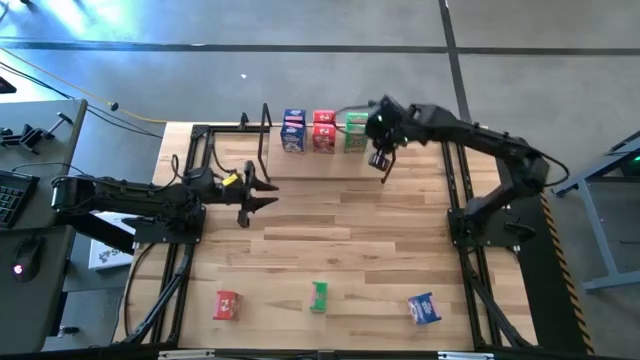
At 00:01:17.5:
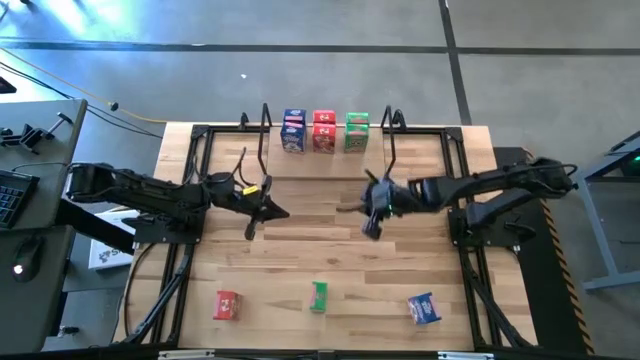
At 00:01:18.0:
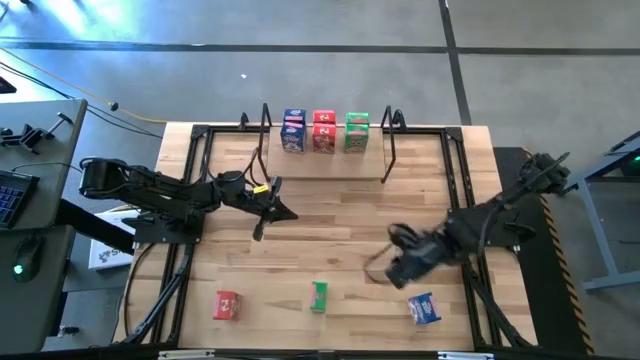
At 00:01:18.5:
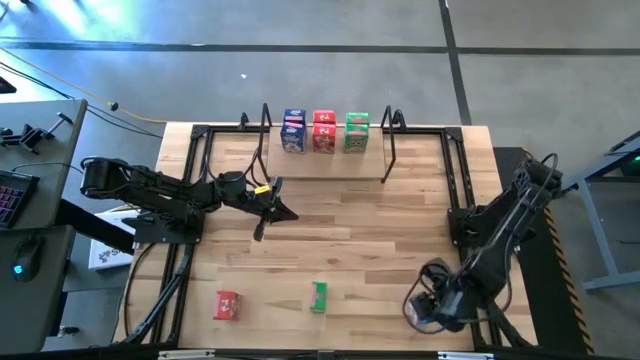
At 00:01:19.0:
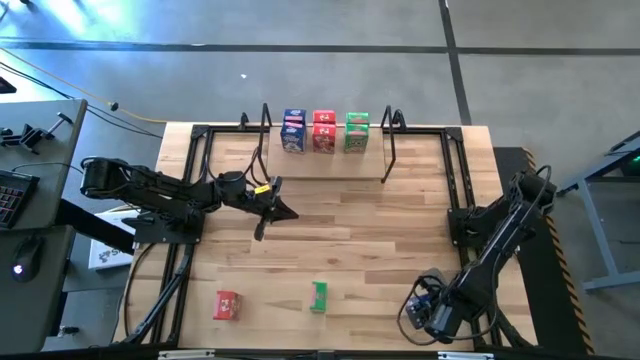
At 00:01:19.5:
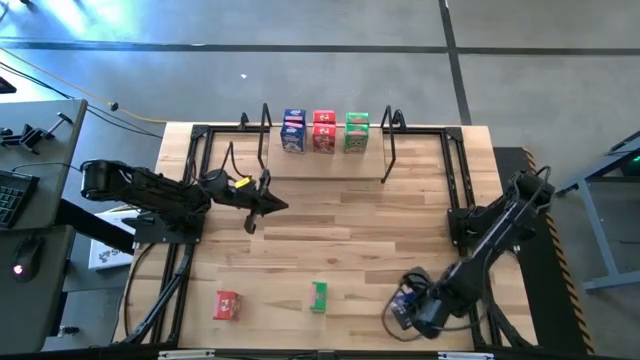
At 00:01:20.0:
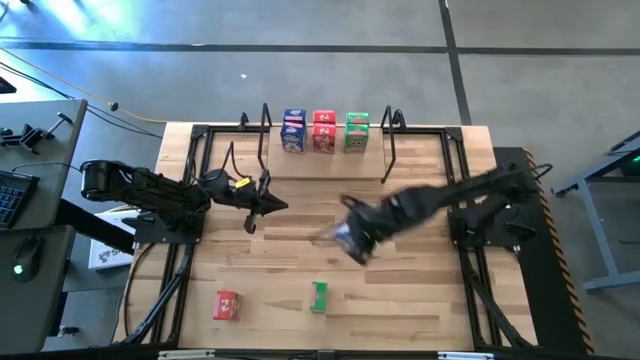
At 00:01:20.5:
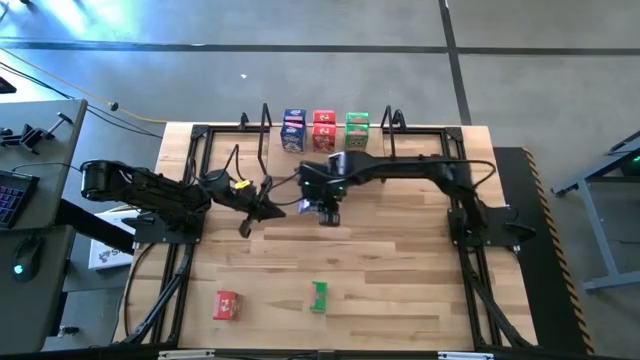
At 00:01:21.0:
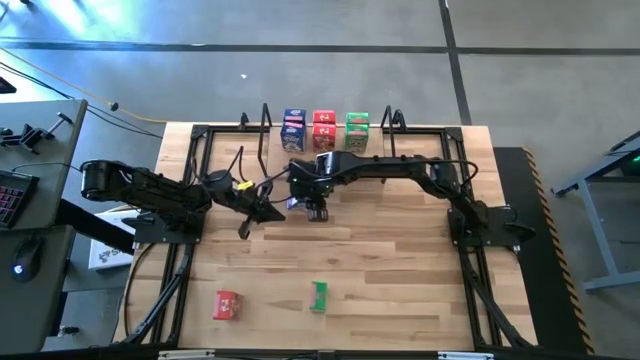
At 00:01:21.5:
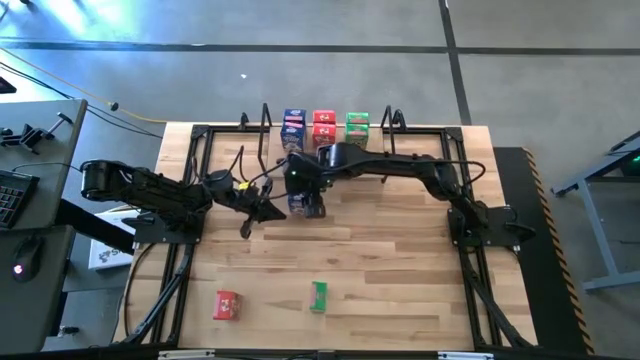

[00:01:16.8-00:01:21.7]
Task: Stack cereal on shelf
Move the blue cereal box to the center of the table

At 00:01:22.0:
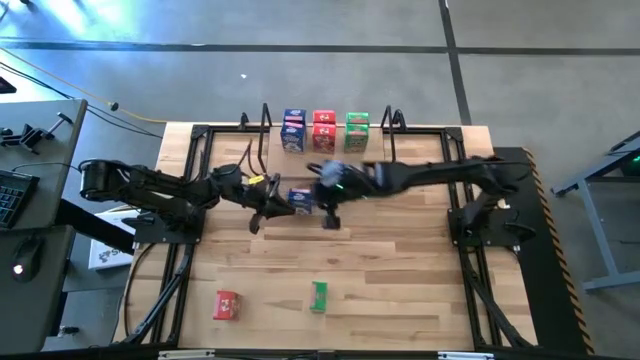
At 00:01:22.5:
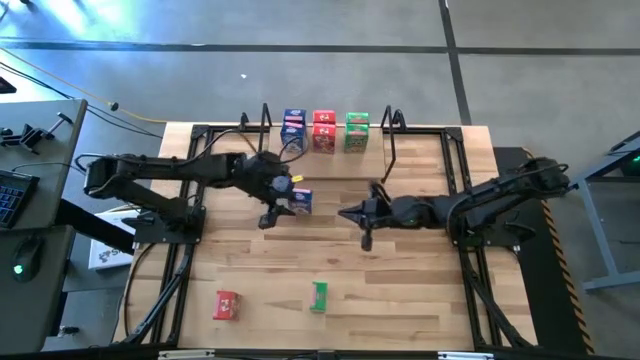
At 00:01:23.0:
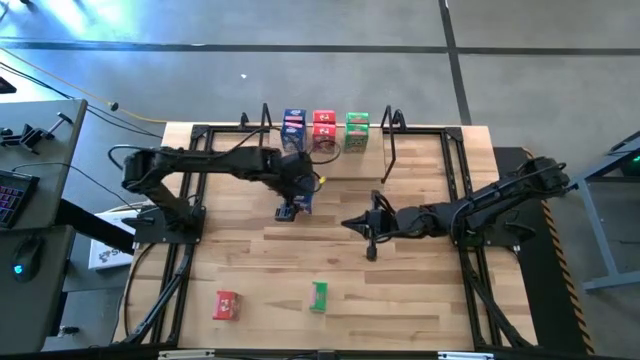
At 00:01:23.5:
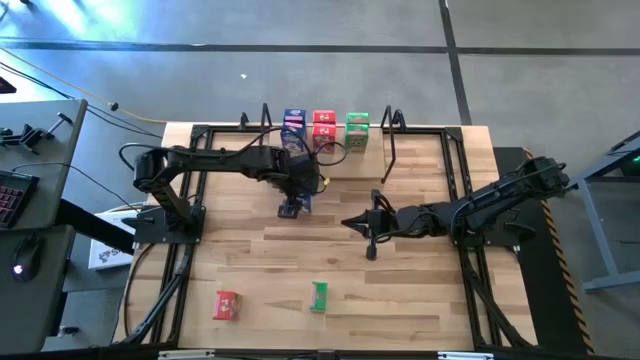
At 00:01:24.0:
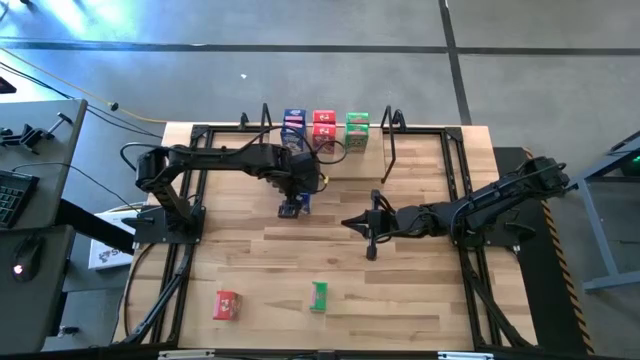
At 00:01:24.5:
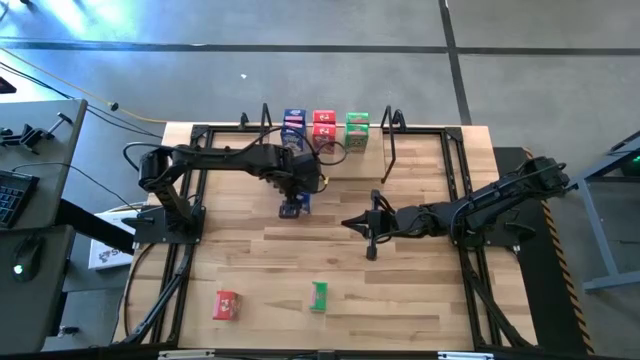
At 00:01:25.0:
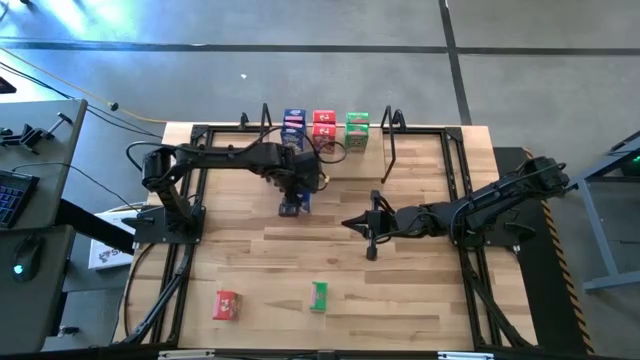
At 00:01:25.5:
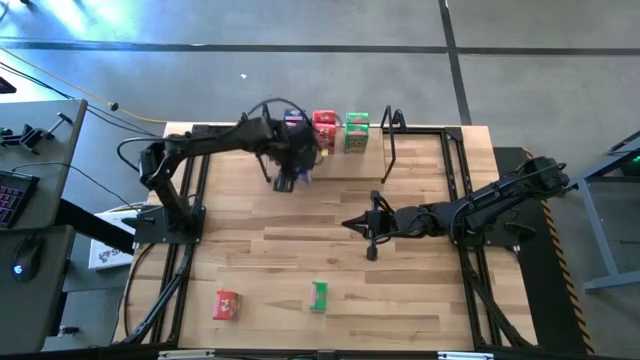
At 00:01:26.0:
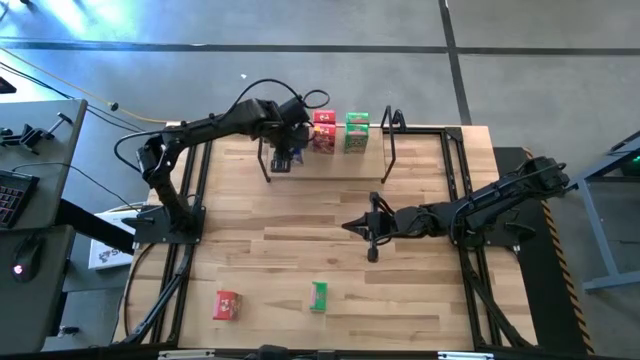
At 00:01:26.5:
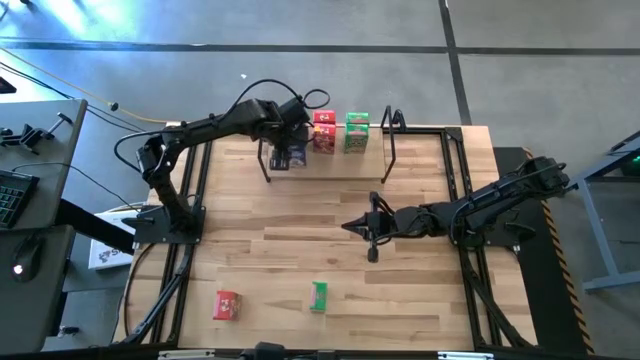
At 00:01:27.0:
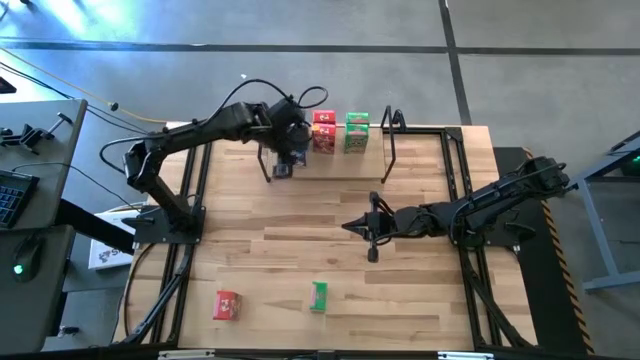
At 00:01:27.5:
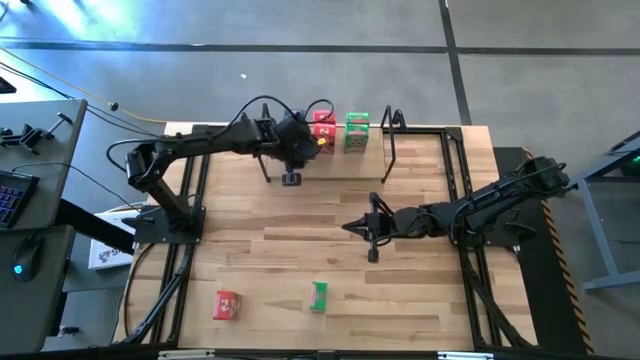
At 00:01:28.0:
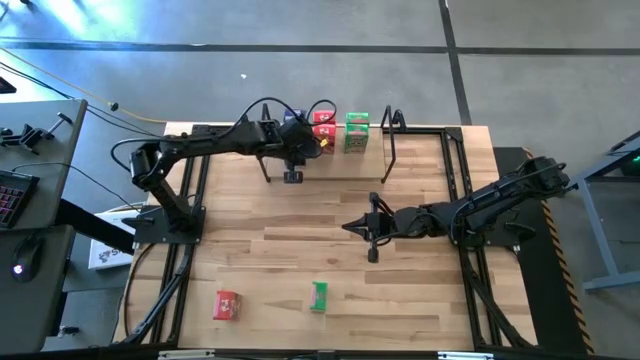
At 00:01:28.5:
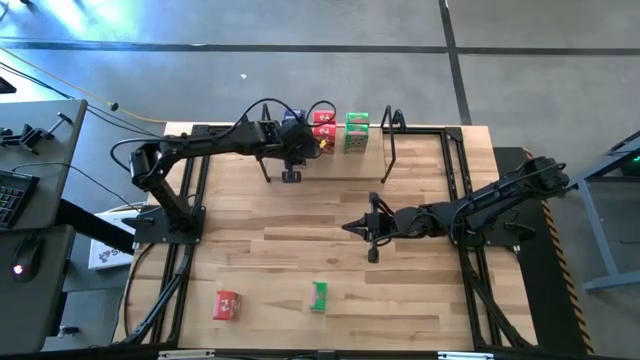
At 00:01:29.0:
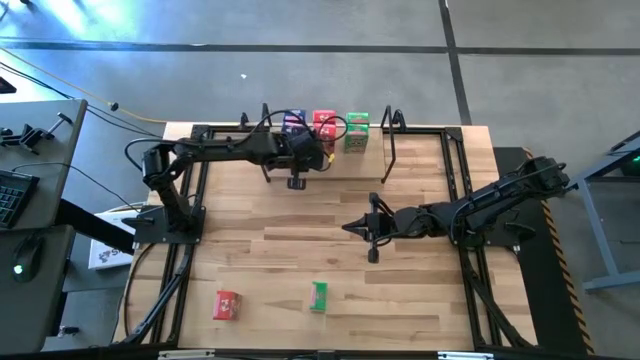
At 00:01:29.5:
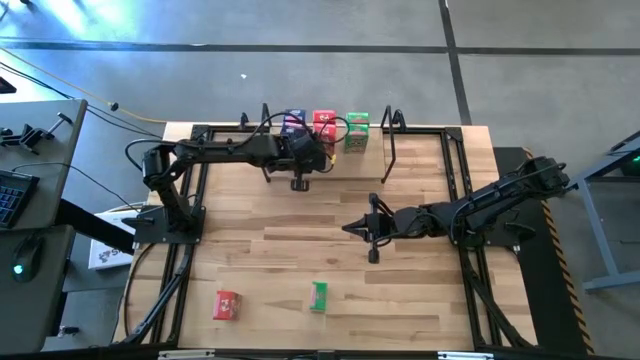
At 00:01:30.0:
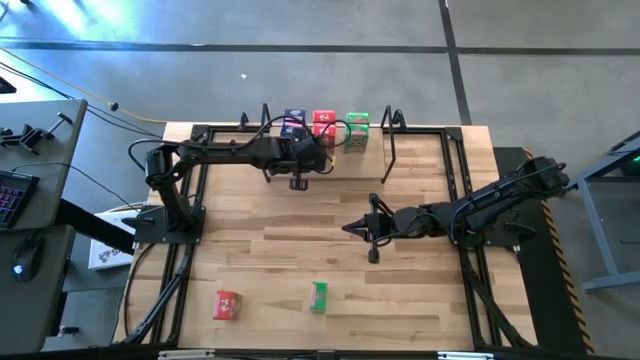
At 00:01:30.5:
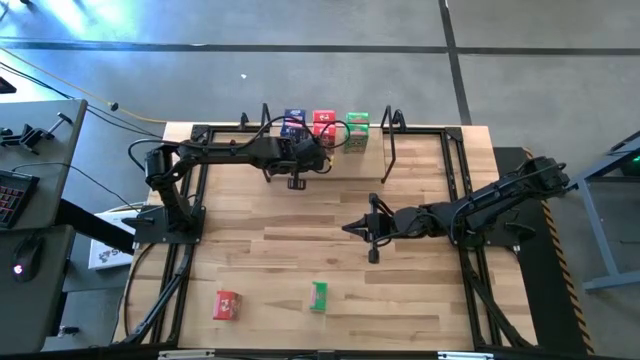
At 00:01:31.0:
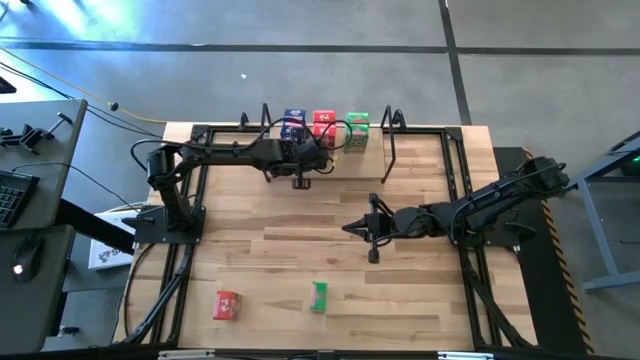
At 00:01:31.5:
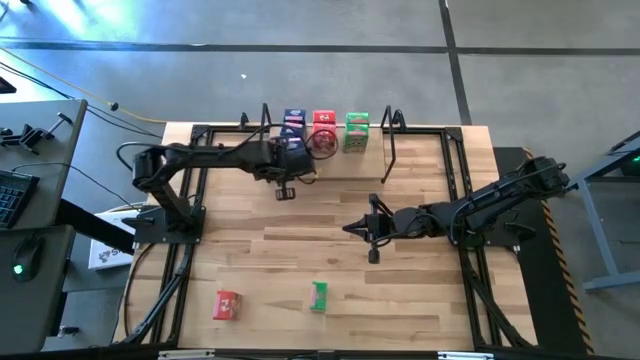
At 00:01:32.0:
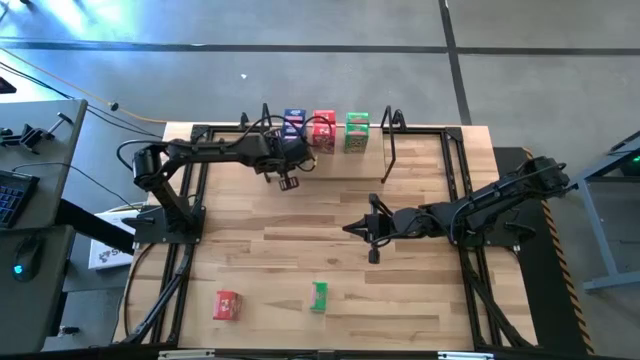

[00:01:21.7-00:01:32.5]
Put the center blue cereal box on the shelf aligned with the other blue cereal box

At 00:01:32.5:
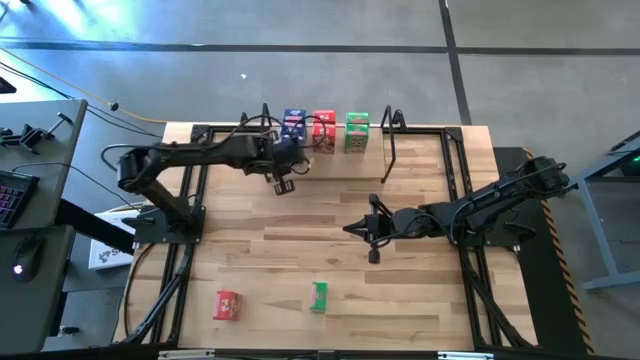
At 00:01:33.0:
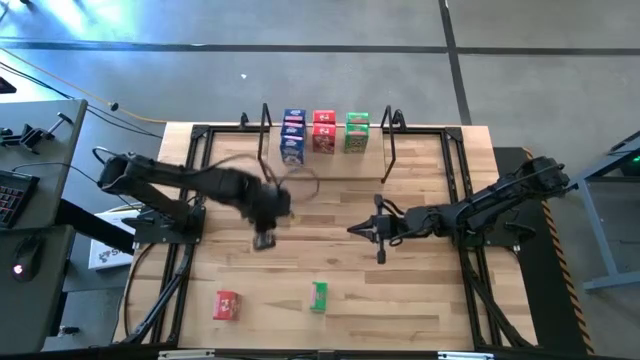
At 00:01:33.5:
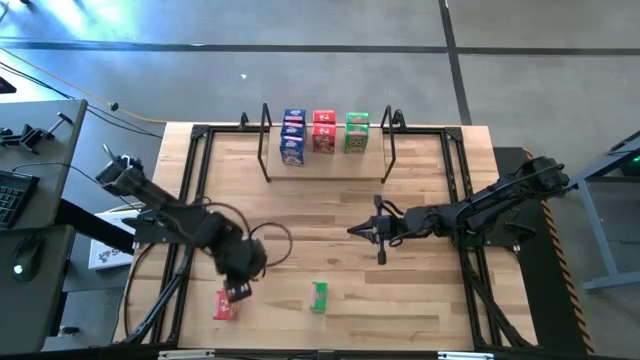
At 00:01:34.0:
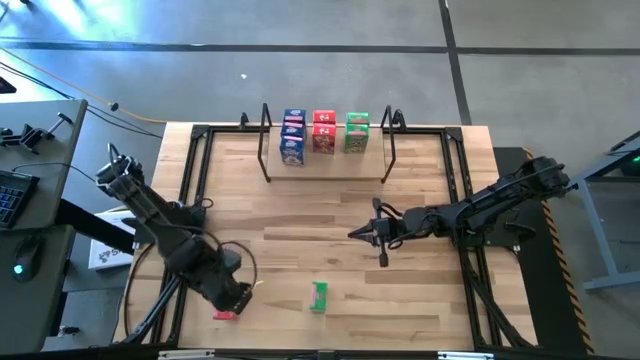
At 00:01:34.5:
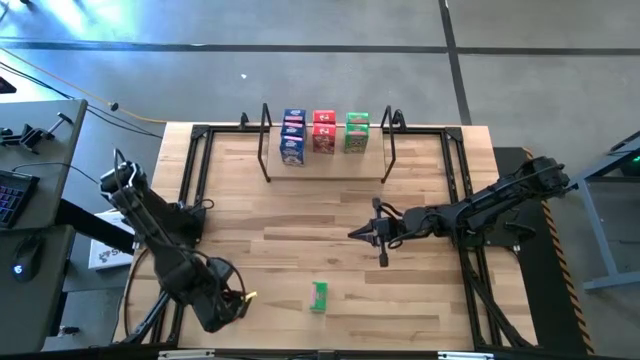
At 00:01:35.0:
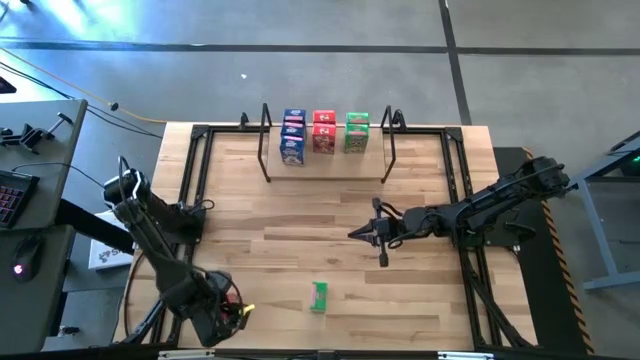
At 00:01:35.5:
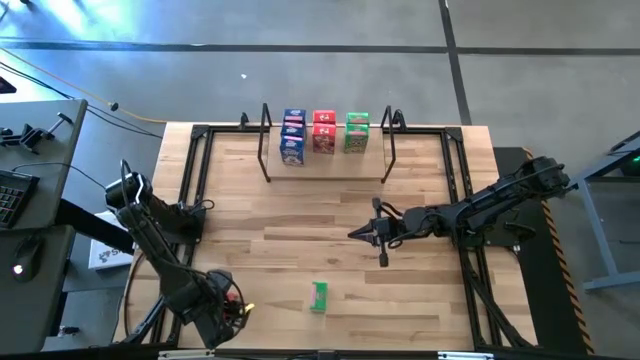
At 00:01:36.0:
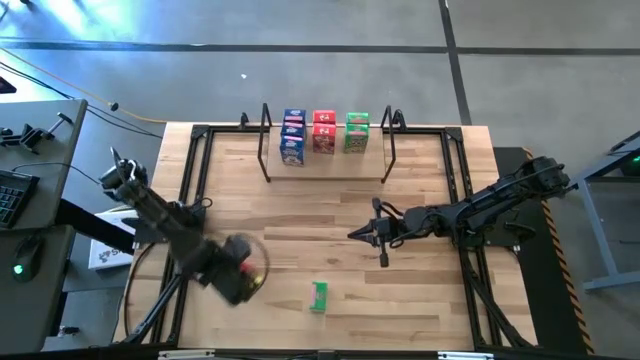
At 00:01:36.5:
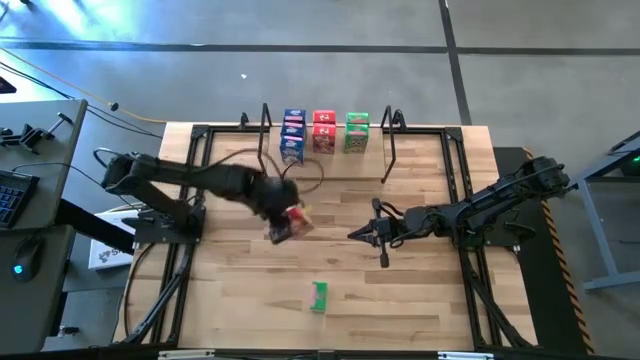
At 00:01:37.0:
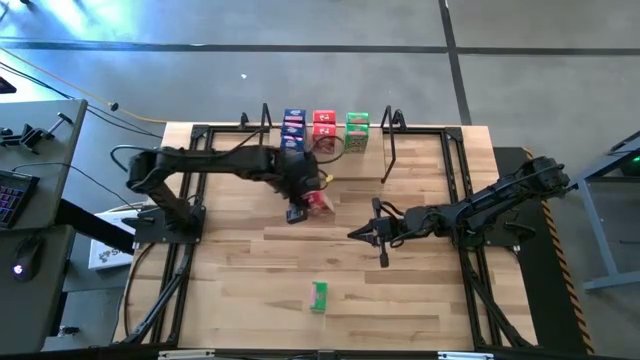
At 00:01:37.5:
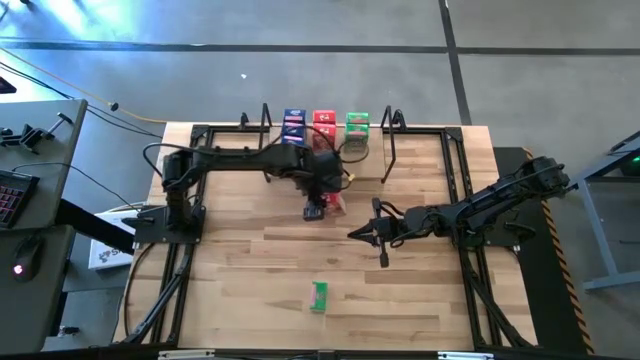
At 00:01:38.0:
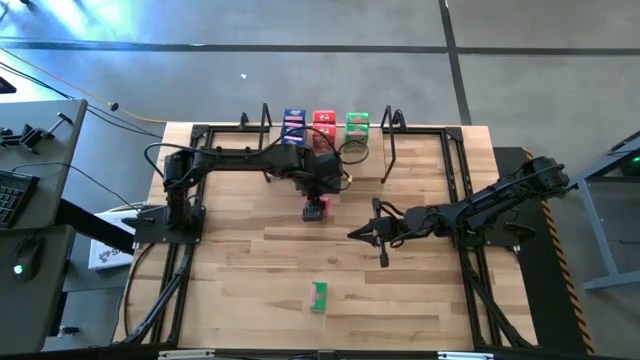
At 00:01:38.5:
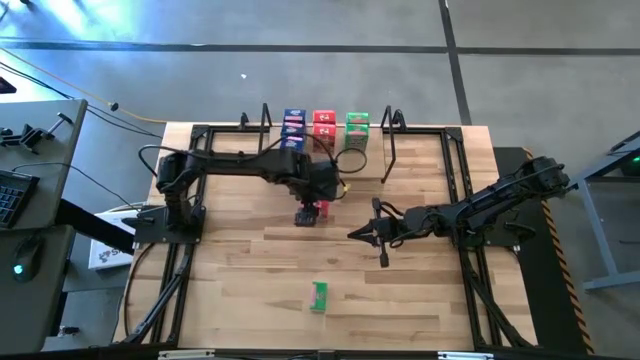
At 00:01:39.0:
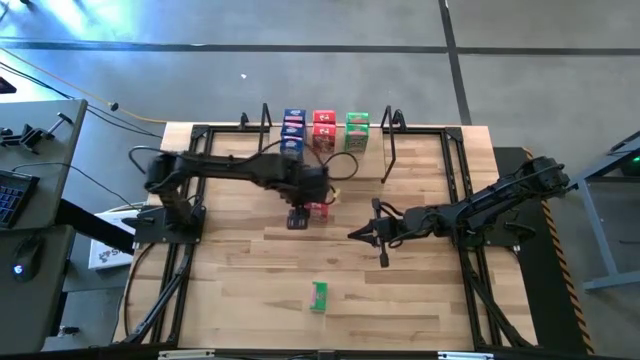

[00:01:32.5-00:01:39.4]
Move the red cereal box to the center of the table
